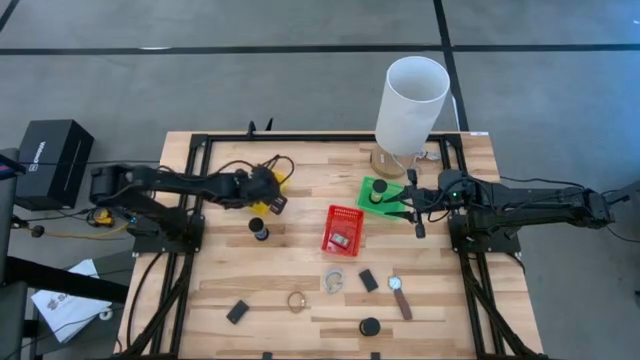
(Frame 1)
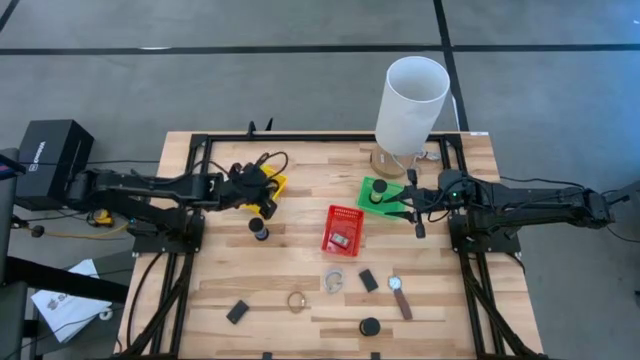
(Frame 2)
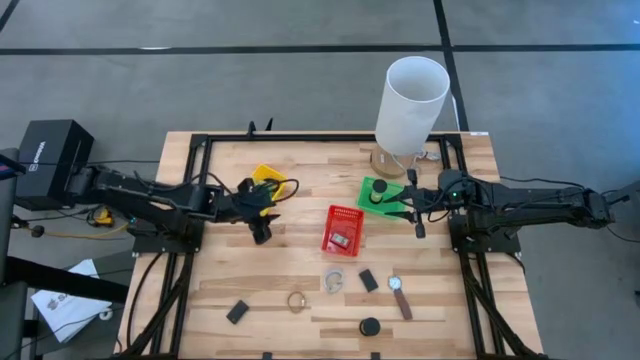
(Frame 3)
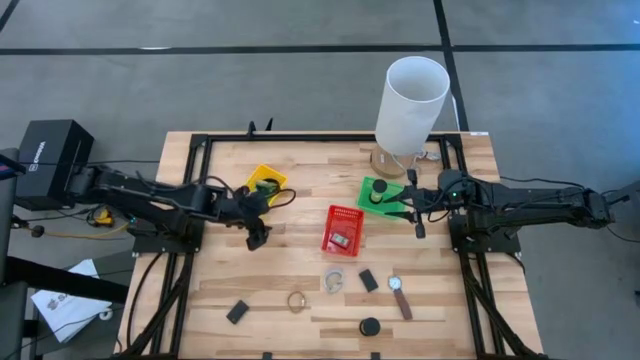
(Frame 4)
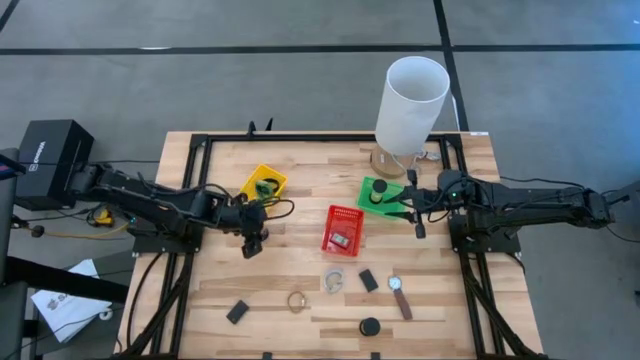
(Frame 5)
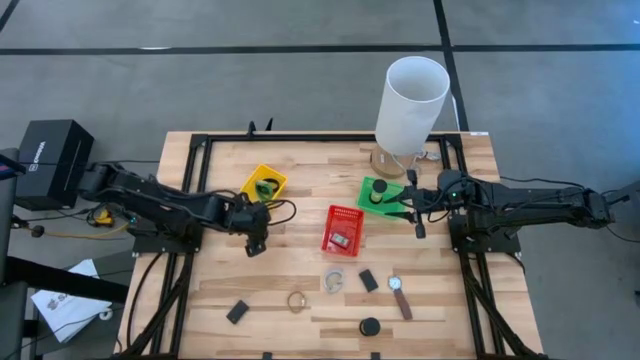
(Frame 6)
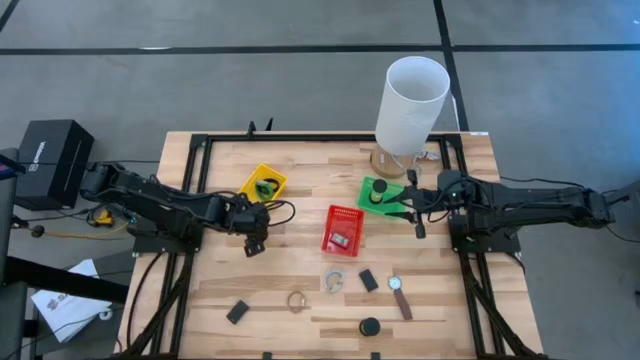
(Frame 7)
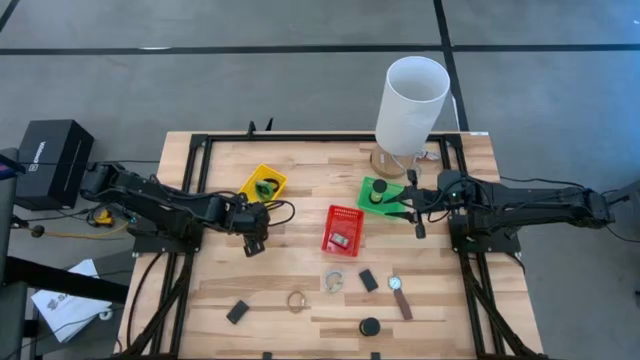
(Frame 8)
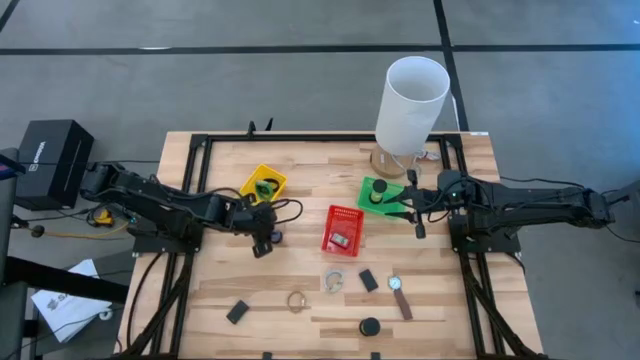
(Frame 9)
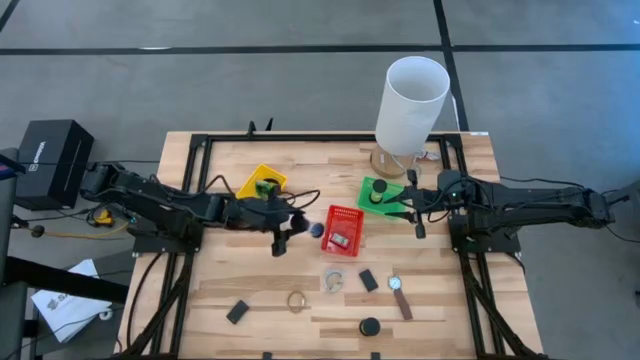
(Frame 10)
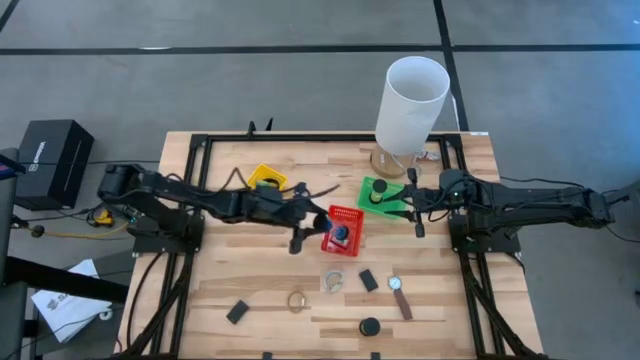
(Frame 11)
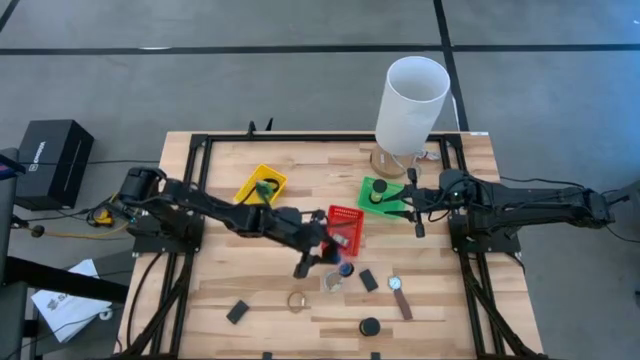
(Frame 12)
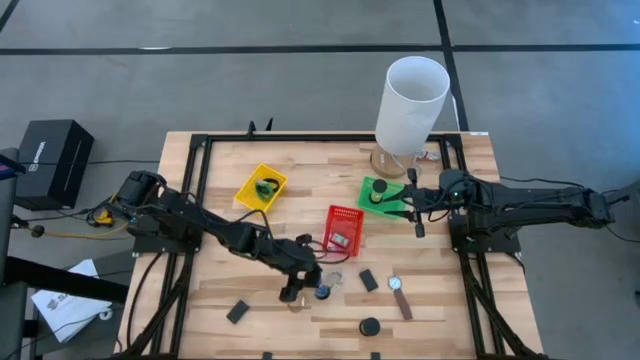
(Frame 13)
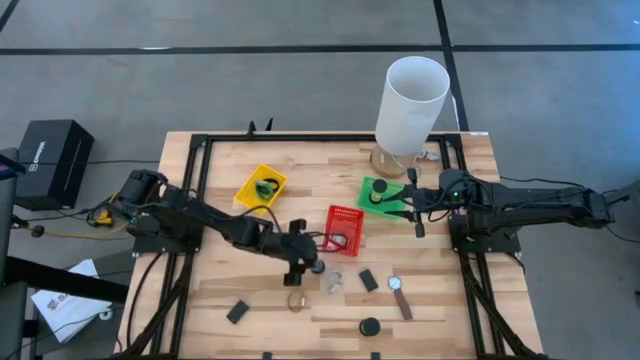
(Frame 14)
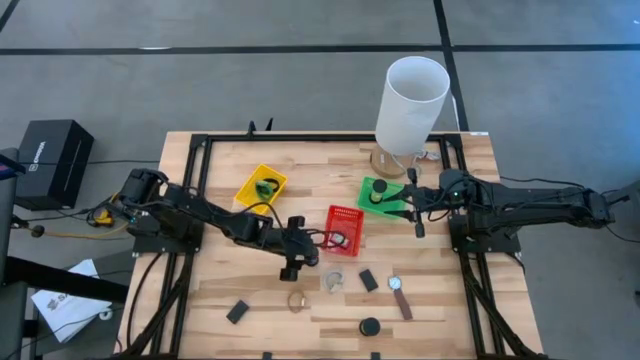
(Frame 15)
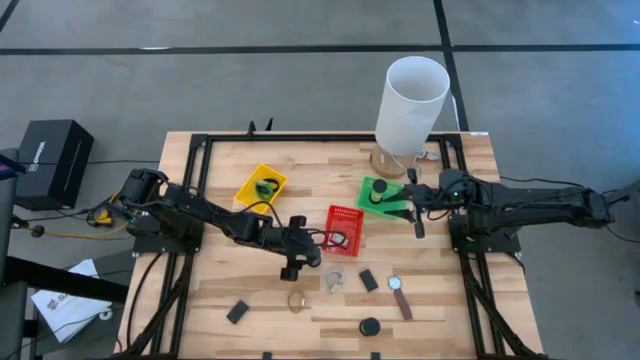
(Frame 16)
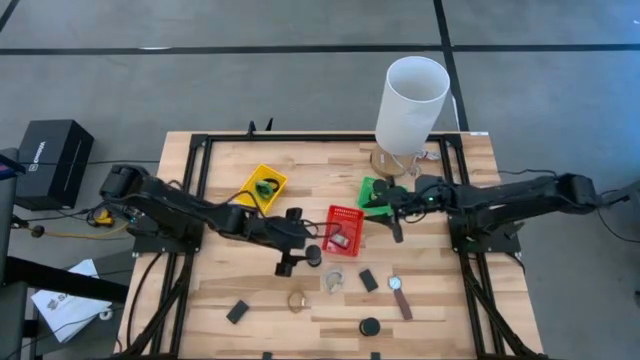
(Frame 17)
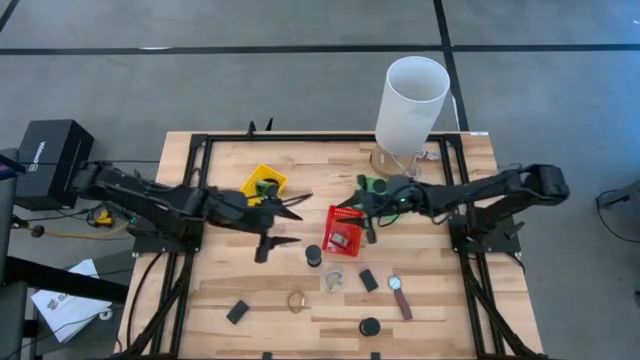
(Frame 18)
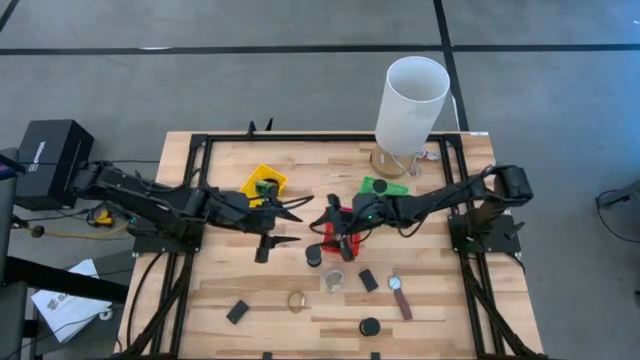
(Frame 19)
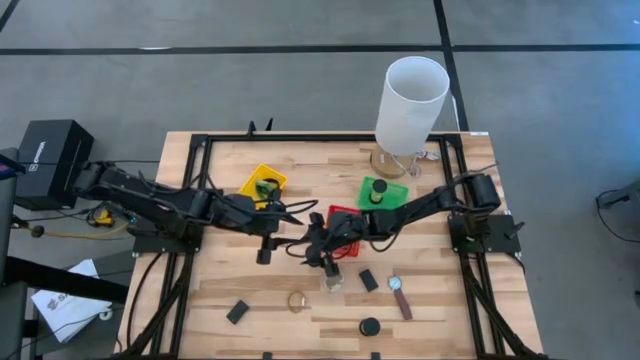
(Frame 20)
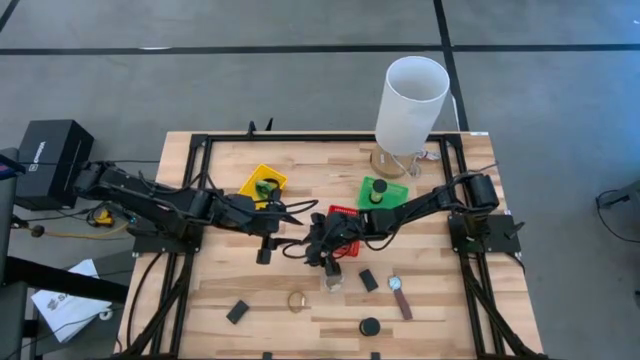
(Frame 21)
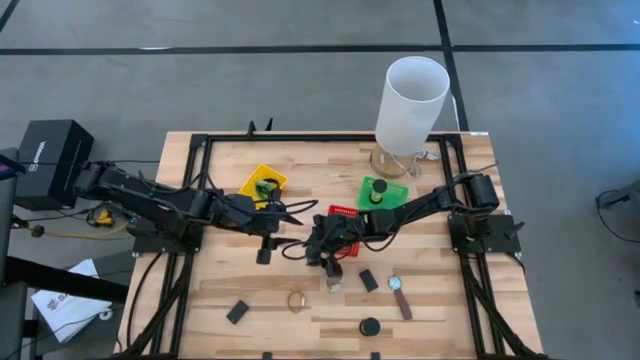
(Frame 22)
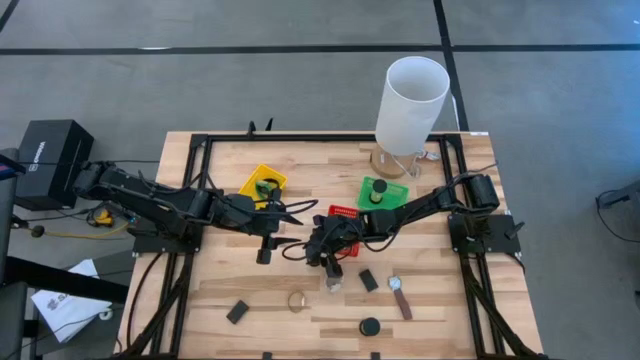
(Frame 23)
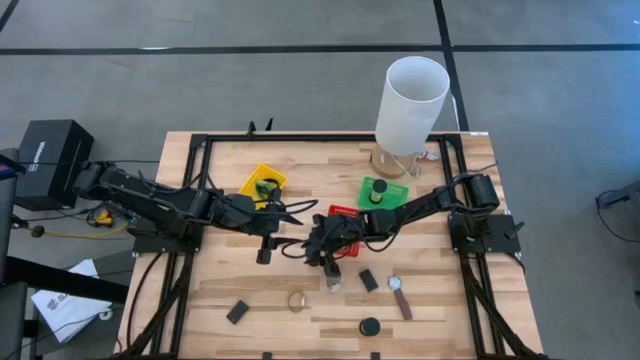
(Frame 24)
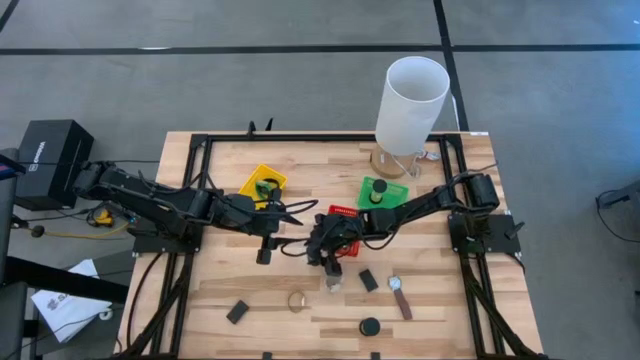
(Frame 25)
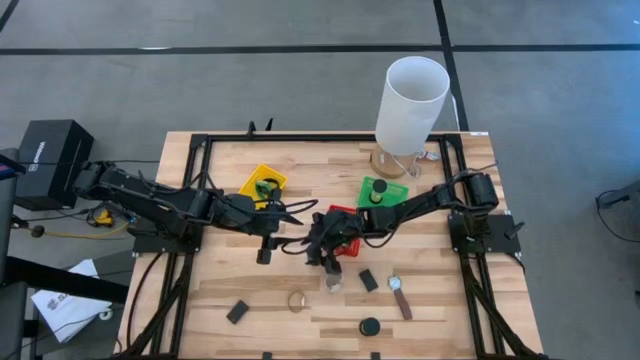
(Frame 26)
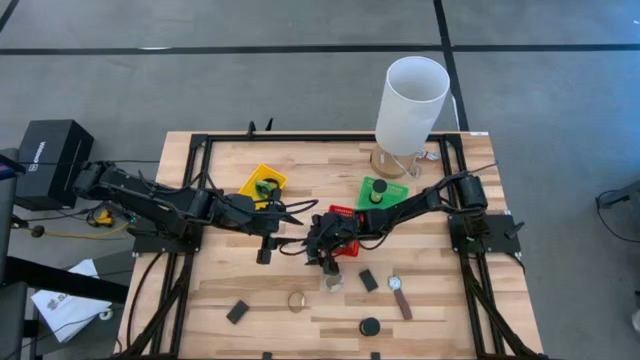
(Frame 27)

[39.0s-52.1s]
Task: Pick & Place Office items
Put the top left black hourglass into the green bin

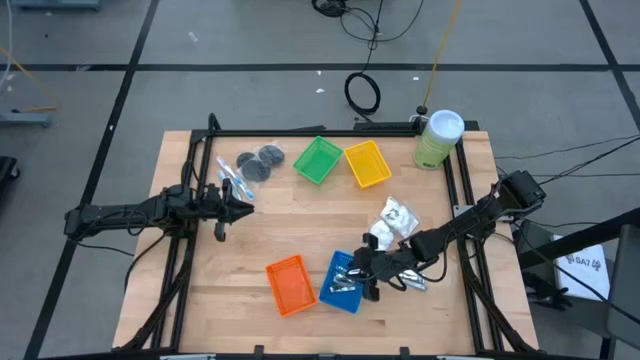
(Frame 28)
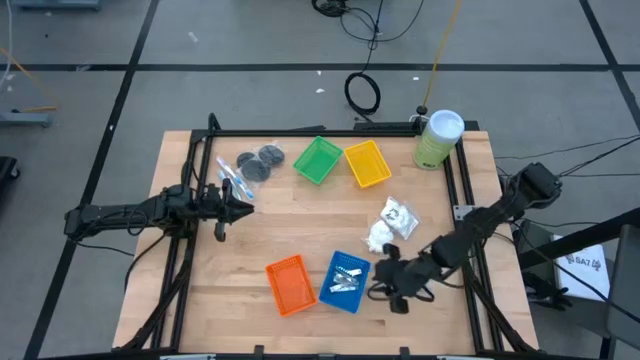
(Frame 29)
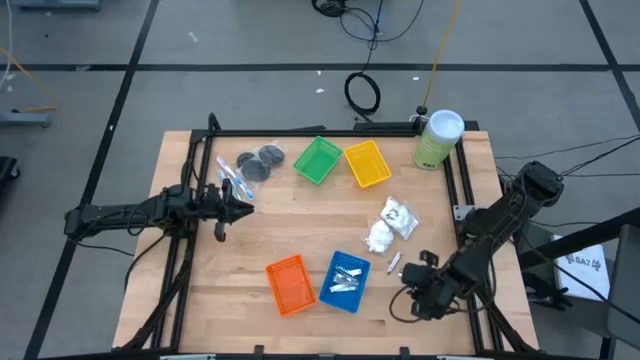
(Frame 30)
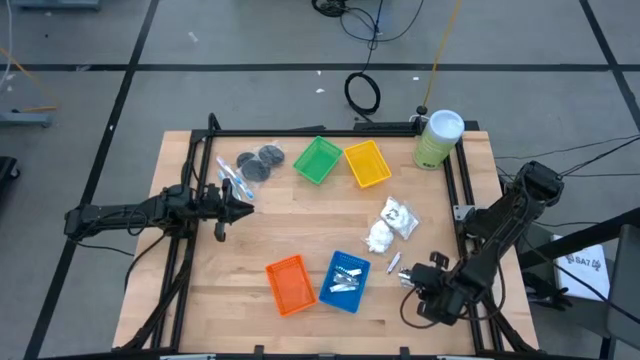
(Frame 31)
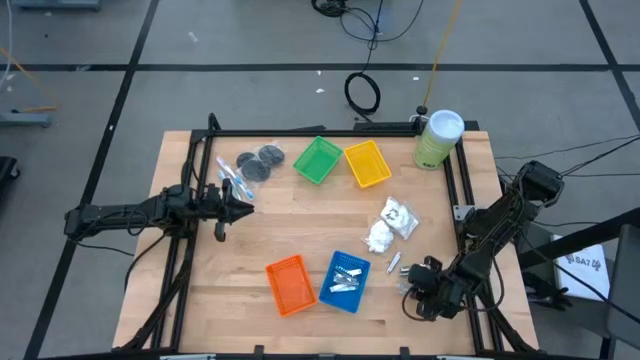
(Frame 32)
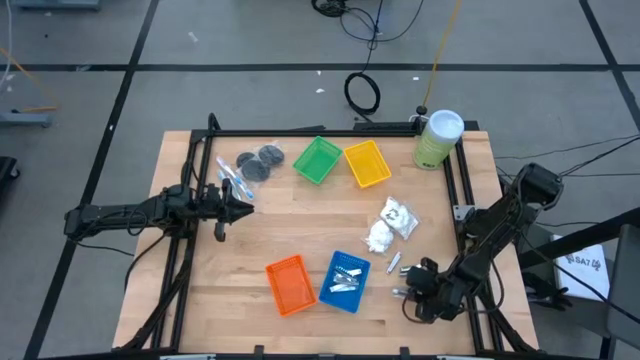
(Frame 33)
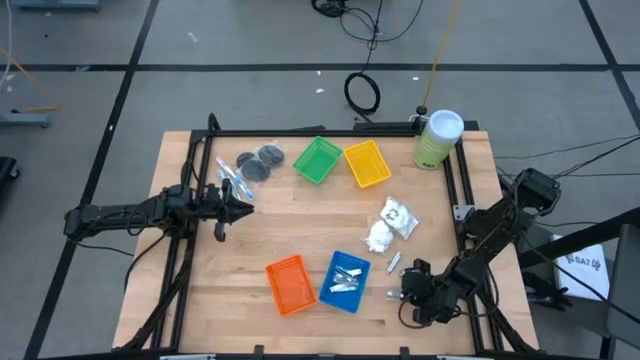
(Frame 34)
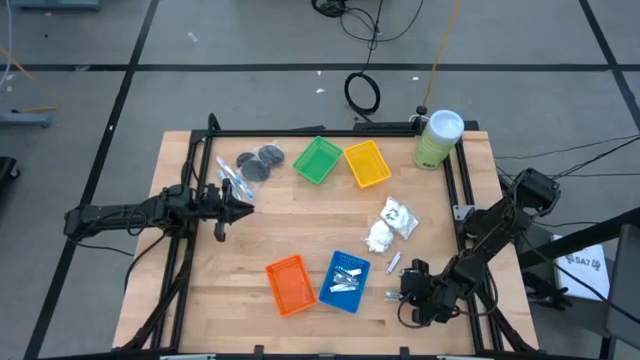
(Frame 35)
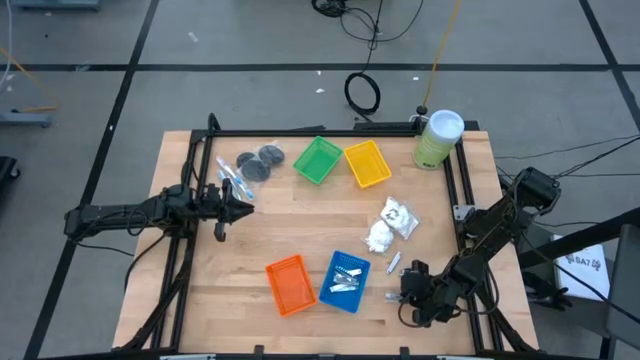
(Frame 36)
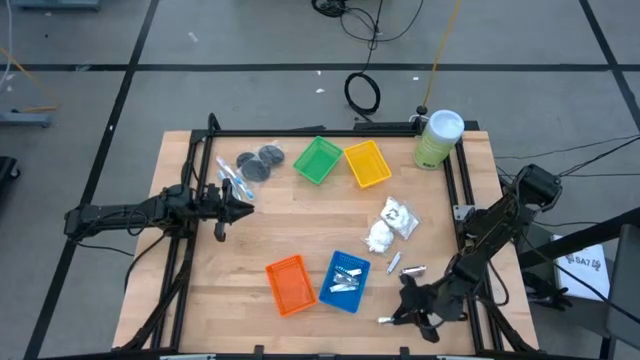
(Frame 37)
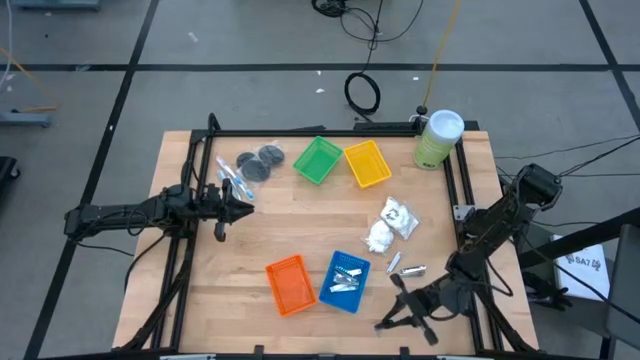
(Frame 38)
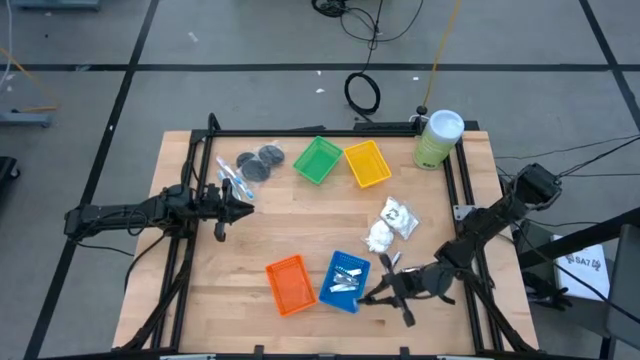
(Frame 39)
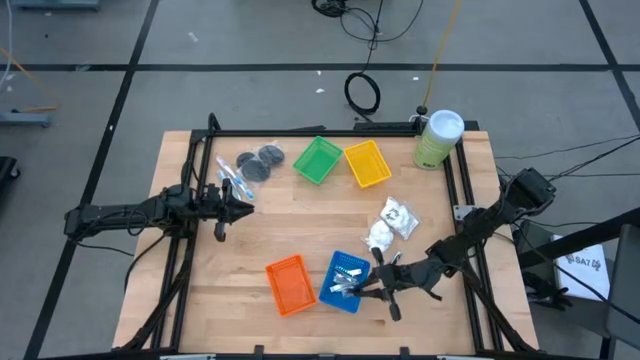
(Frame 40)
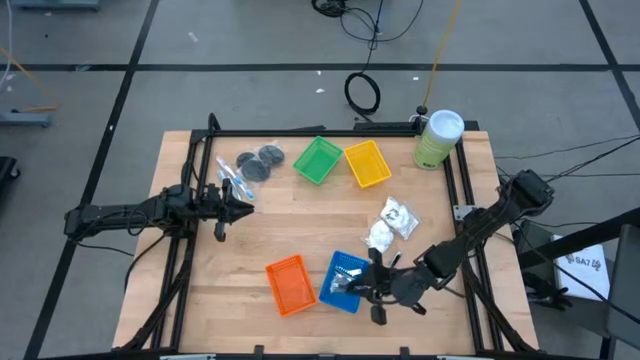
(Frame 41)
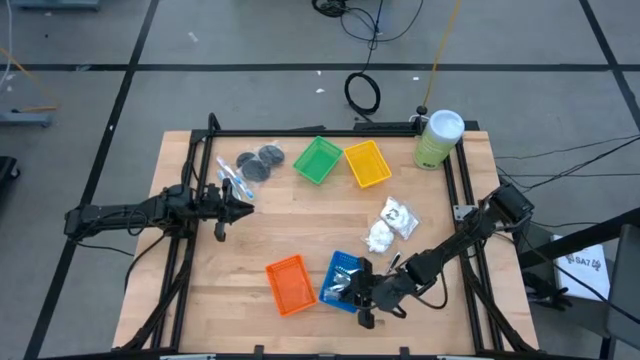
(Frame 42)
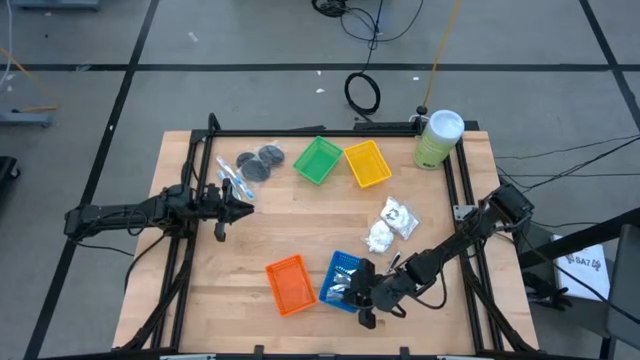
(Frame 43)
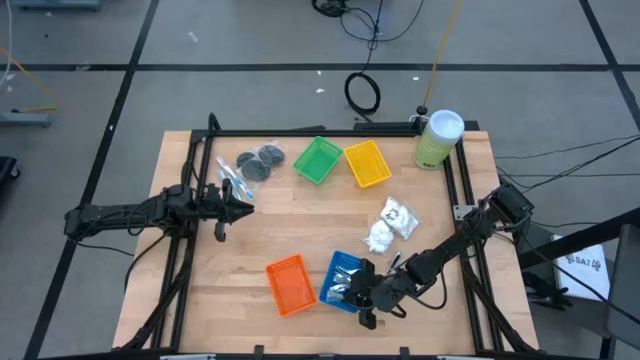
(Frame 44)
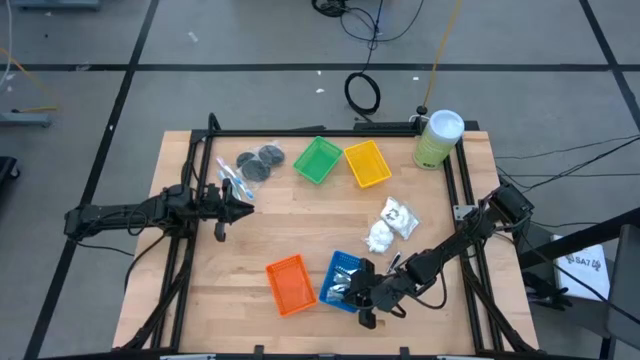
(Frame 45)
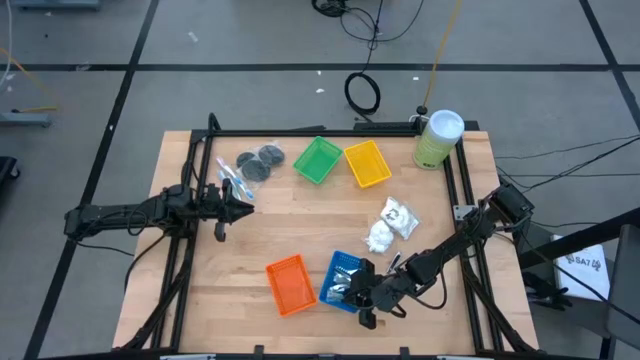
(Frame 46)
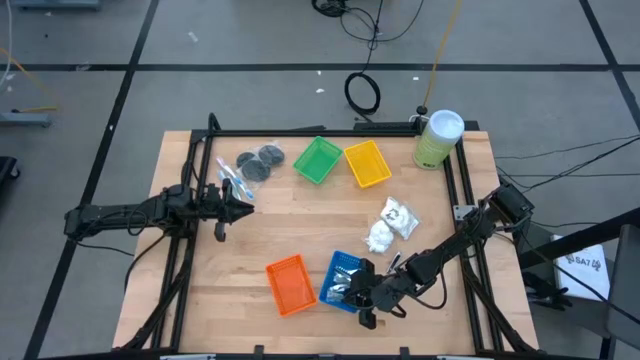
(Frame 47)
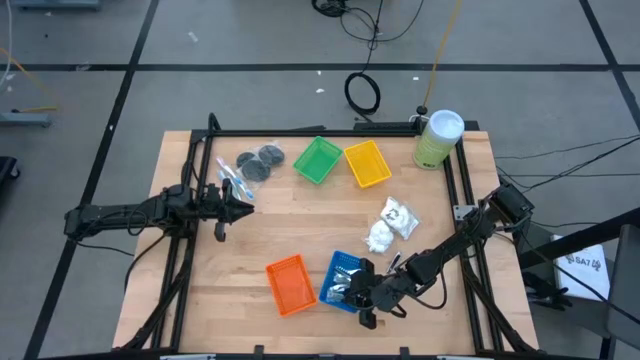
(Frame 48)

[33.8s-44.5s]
Task: Pick & Place Travel size toiletries
Put the silver nail cutter into the blue bin
